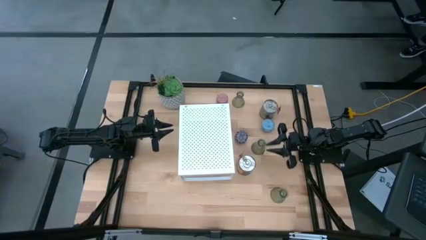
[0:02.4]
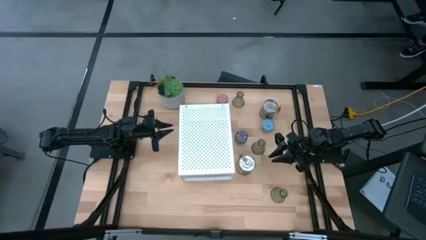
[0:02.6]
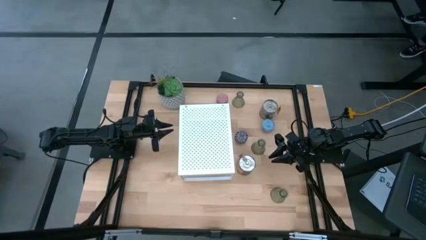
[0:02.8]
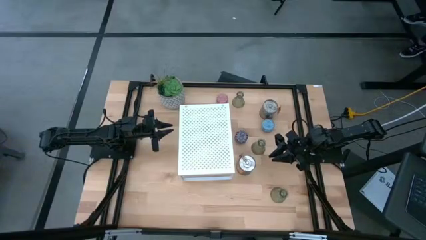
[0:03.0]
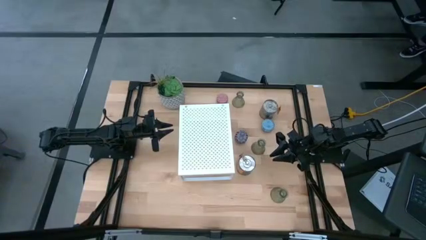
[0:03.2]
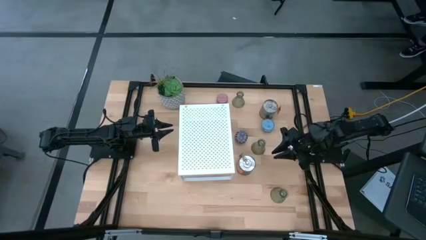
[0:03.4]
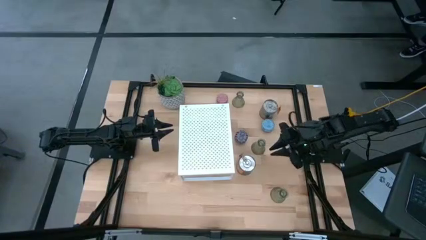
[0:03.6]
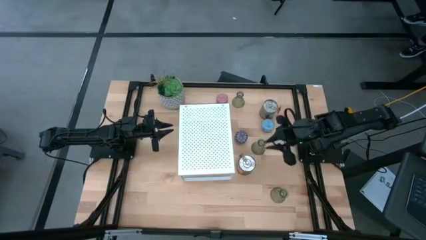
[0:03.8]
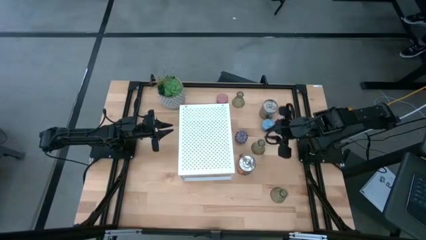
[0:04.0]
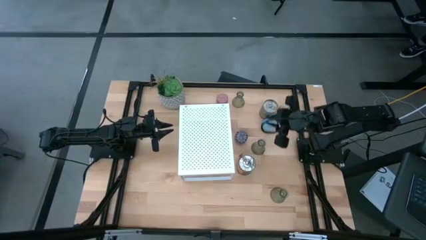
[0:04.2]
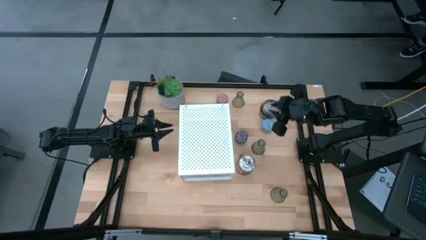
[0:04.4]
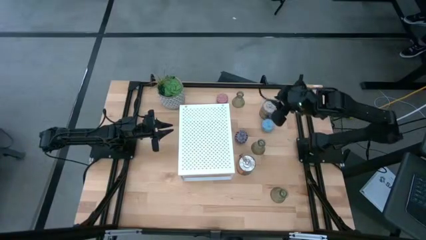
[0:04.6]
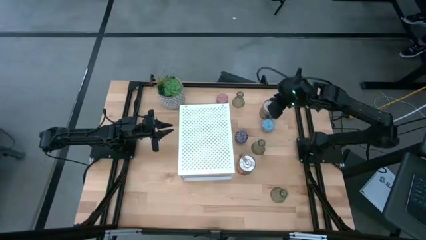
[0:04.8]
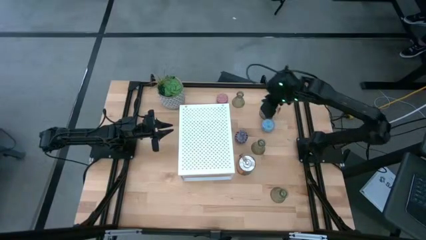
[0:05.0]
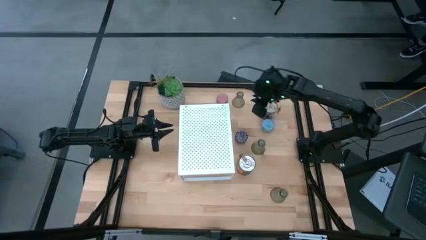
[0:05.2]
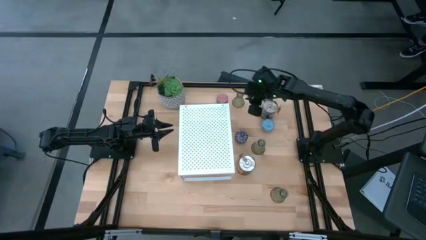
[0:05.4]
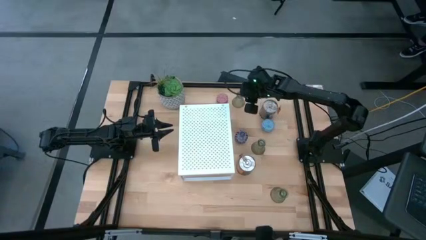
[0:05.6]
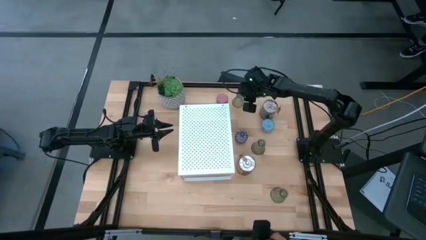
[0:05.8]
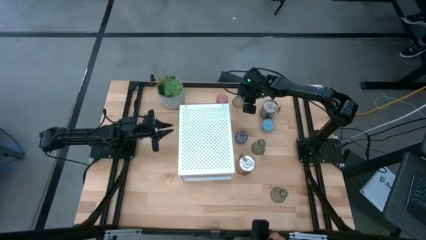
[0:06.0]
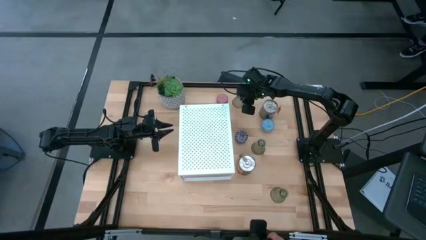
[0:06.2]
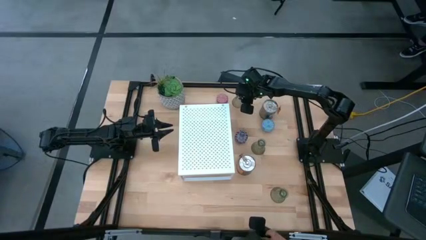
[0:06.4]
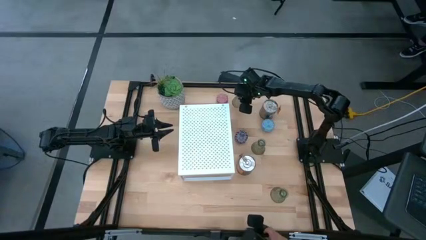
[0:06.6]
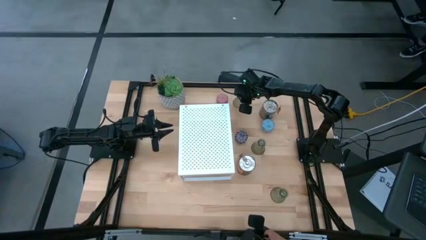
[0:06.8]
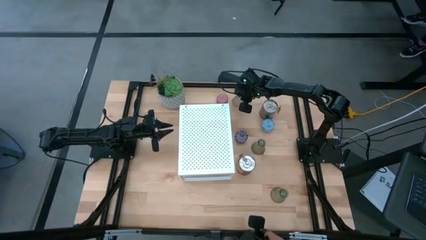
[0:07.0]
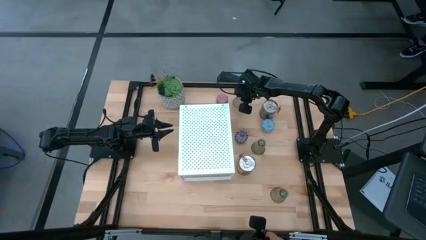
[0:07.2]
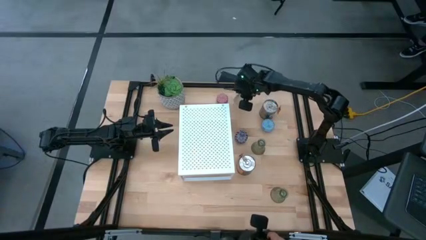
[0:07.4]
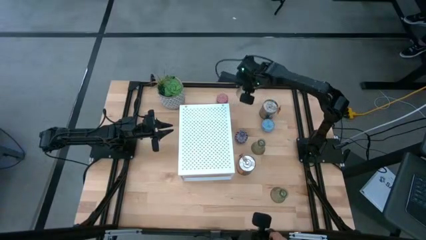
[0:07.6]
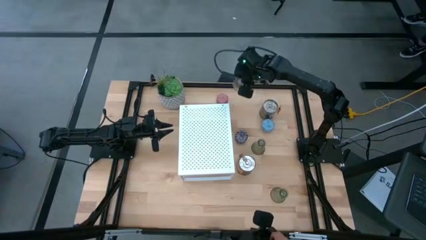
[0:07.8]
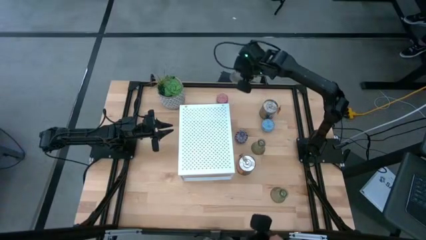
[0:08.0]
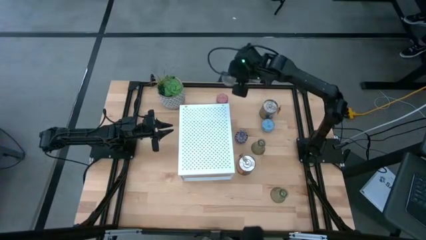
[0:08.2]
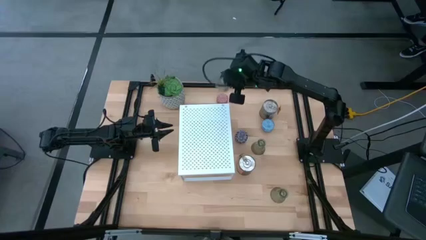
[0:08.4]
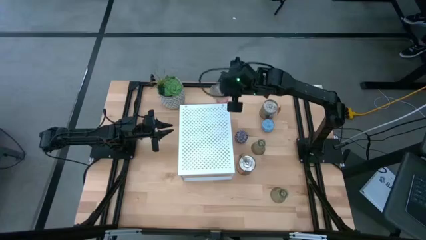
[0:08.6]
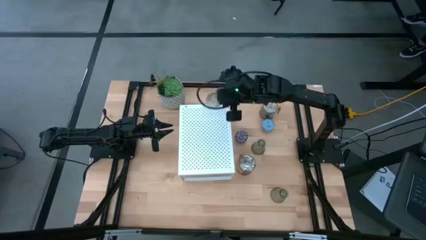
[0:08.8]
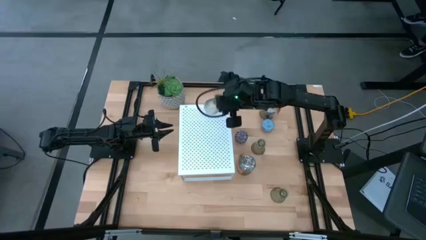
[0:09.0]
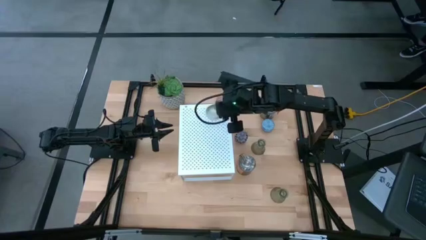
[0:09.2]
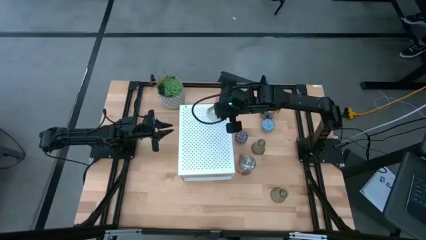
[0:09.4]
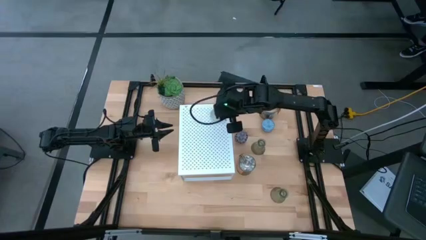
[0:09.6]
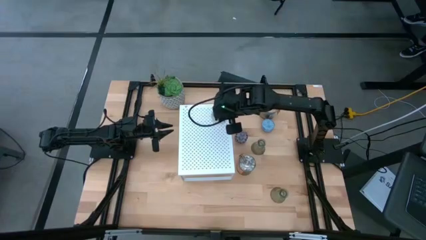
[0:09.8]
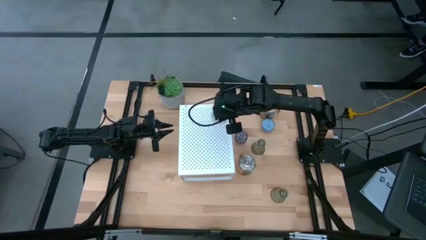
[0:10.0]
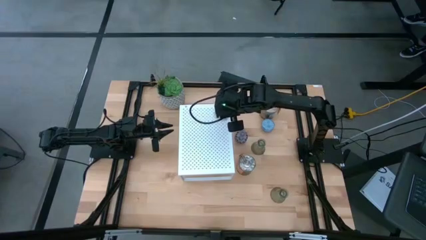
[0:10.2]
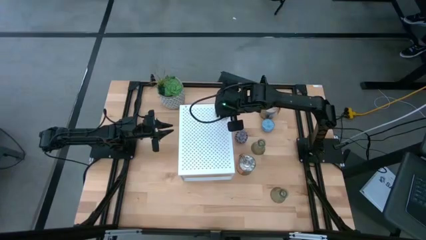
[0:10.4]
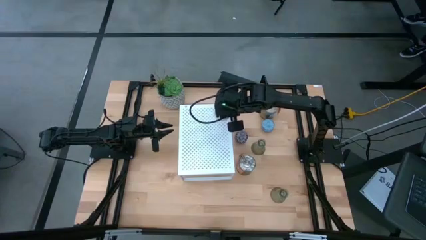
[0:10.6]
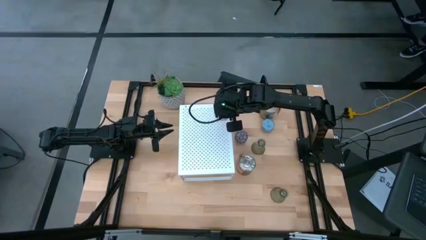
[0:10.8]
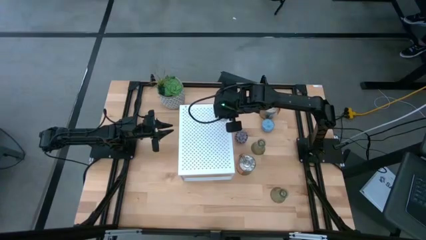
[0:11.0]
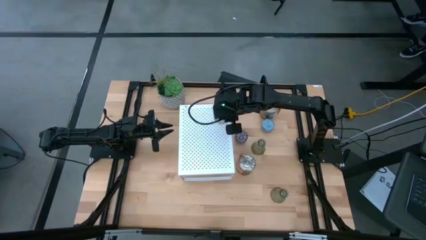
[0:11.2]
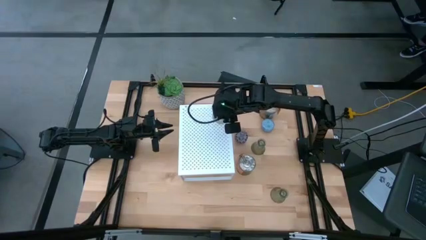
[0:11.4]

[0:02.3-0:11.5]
Task: Pick & Place candle stick holders
Put the top green glass candle holder on the shelf

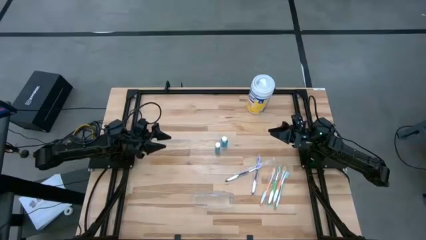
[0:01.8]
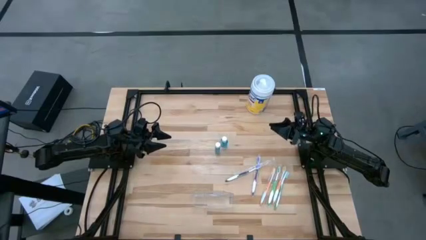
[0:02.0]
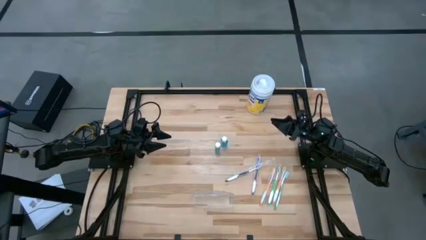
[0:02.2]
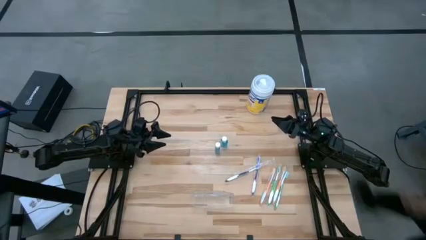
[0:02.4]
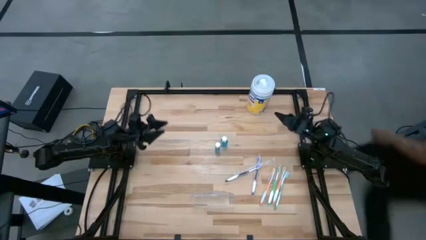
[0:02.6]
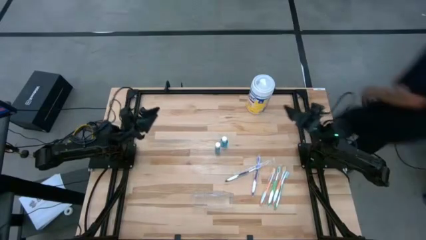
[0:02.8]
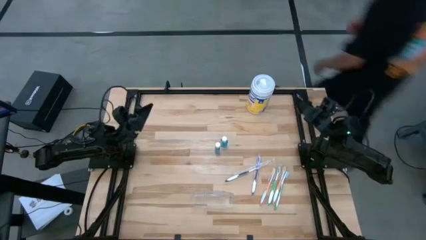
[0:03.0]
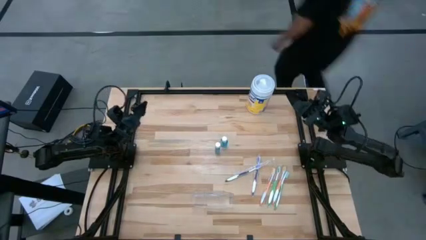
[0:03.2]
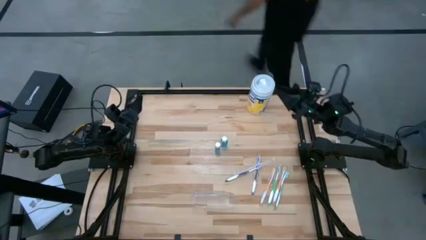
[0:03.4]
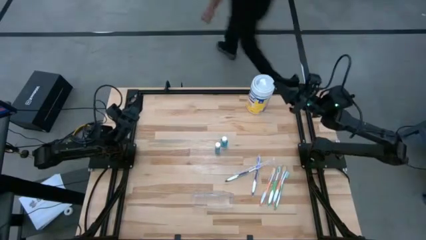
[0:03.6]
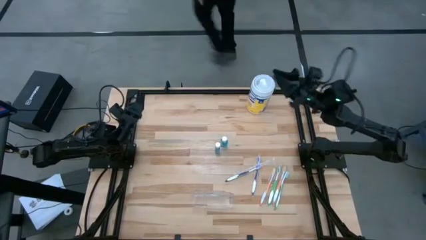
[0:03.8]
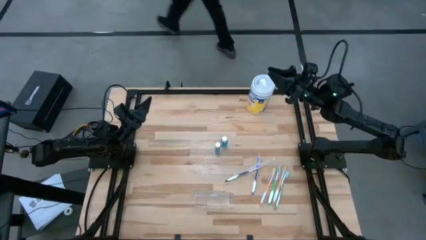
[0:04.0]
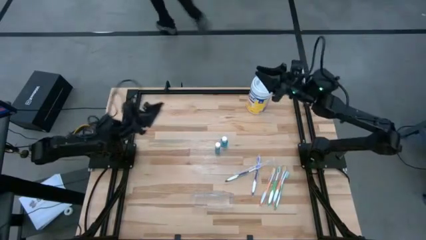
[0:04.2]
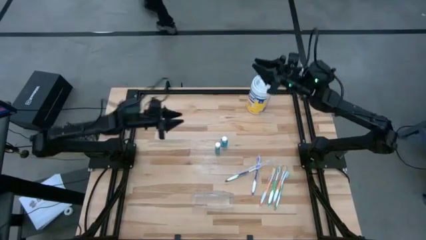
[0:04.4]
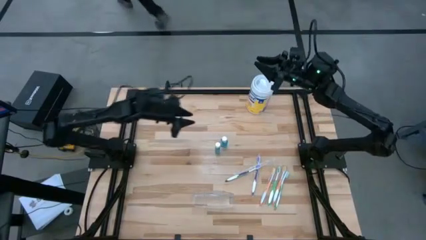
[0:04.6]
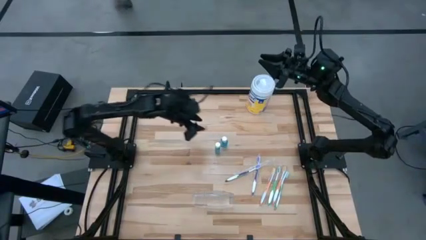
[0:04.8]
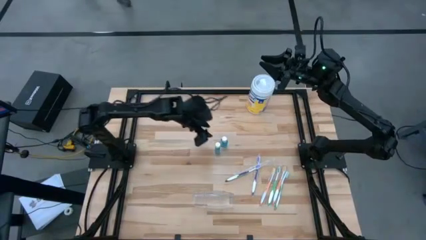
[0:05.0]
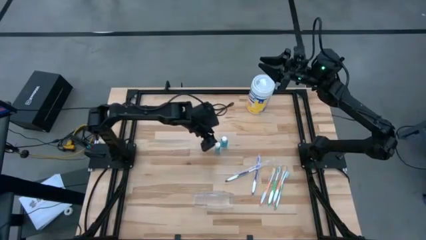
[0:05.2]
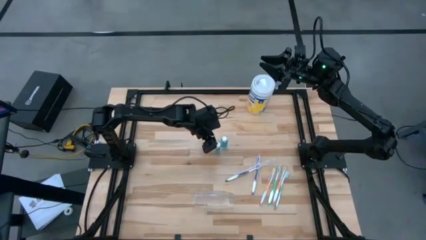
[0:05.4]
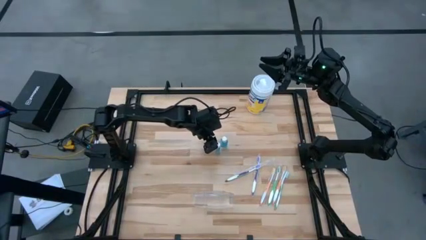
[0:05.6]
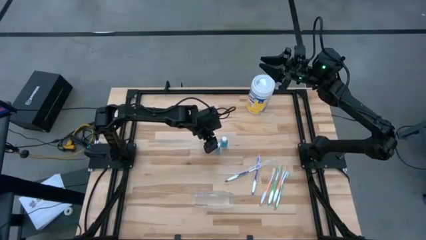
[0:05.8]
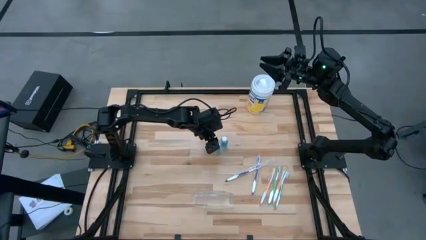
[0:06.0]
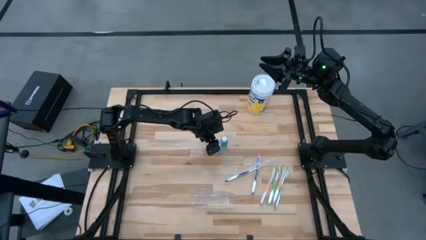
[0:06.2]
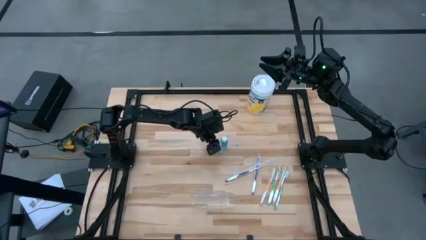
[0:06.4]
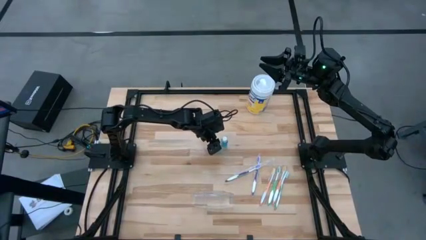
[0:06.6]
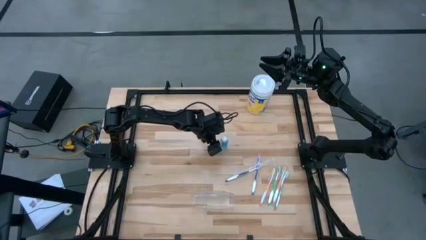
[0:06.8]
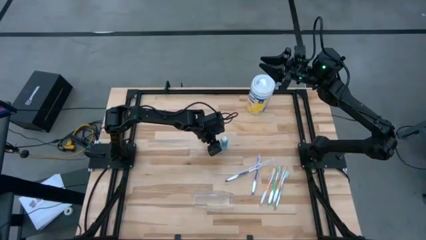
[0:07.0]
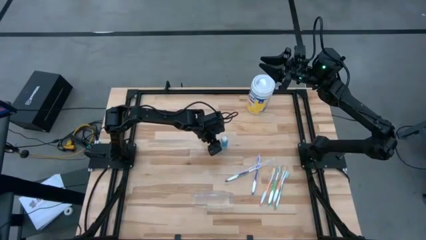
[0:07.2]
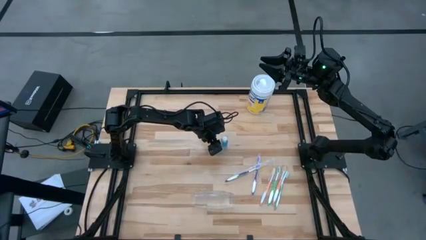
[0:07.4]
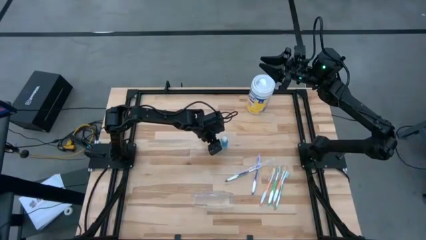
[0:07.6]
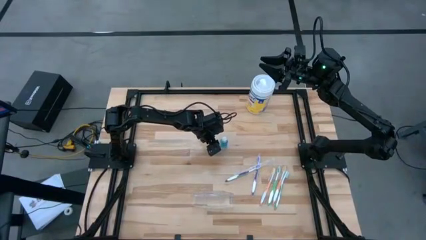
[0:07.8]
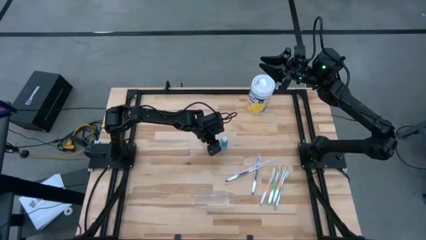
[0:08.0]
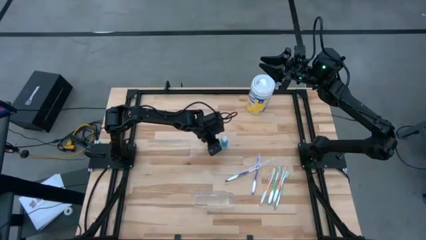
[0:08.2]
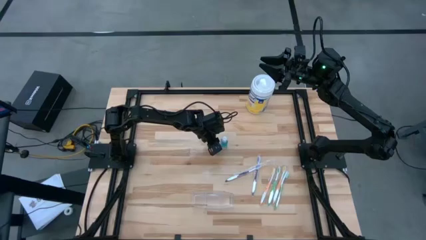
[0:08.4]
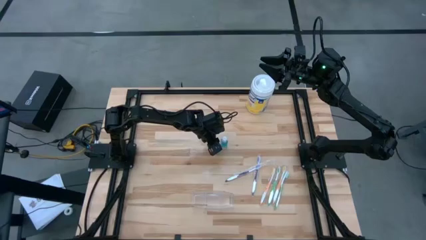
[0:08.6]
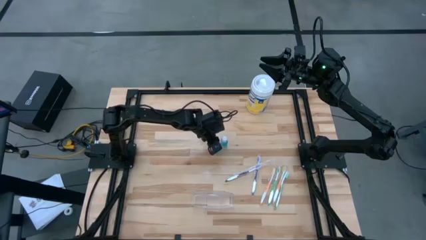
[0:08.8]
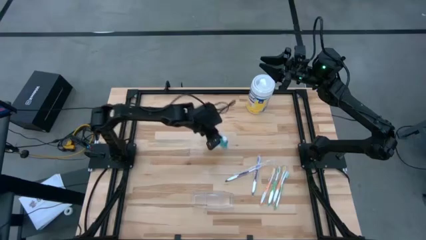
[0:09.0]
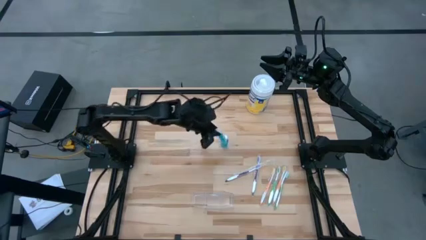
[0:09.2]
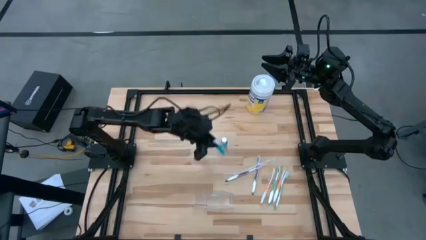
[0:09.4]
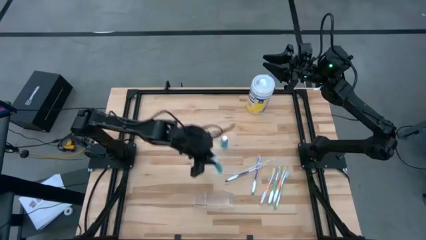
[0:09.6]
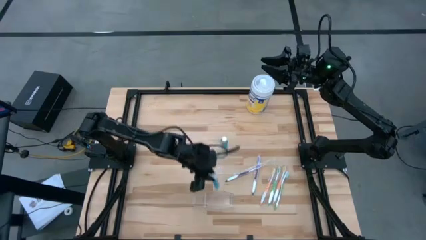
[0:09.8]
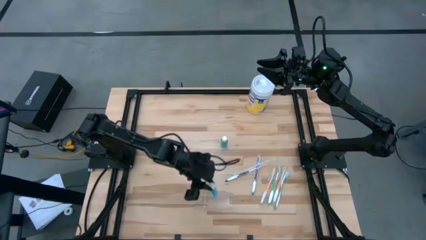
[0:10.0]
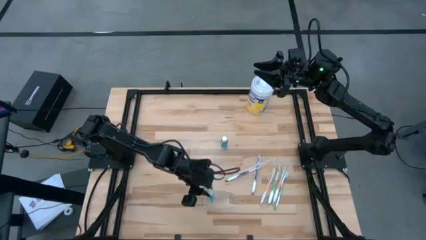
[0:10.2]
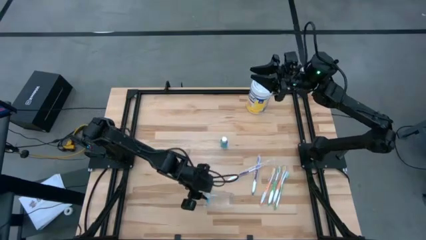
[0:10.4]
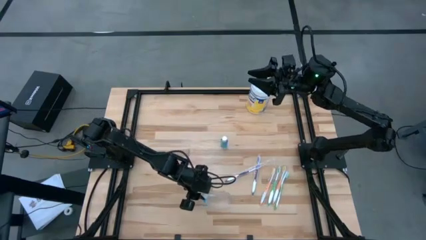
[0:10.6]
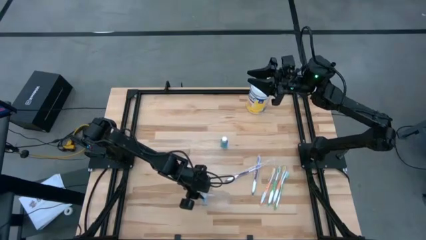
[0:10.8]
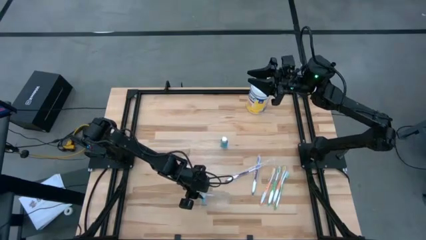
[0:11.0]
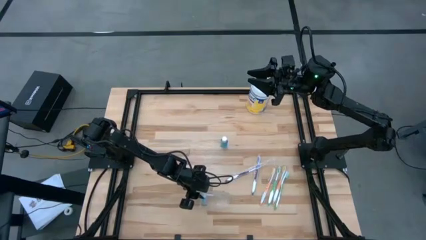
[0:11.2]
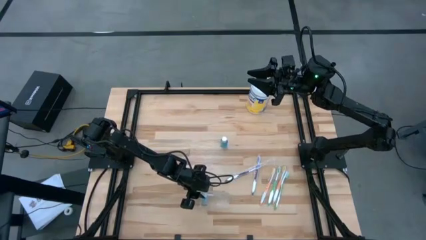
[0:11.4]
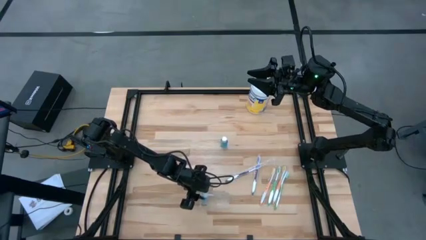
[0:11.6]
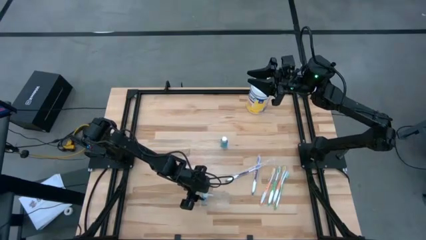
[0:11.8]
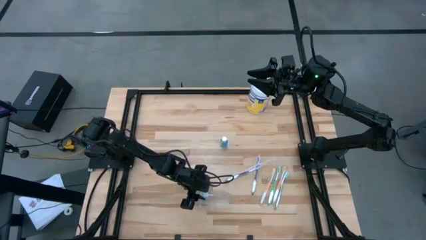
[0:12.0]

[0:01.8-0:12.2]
Task: Pick & Place toothbrushing station
Put the bottom mouthwash into the transparent organizer
